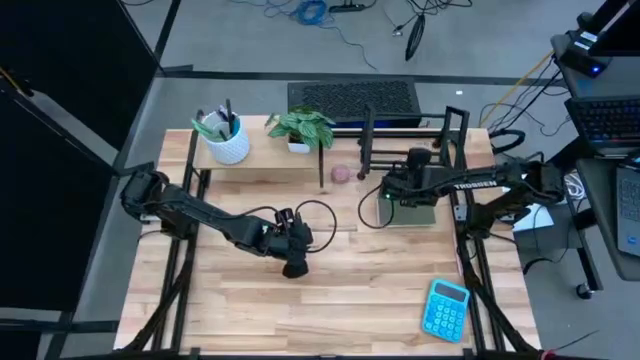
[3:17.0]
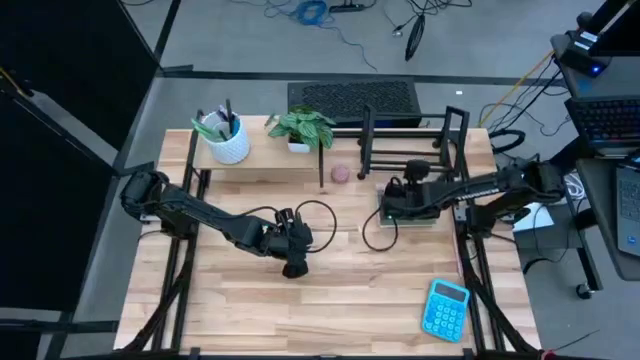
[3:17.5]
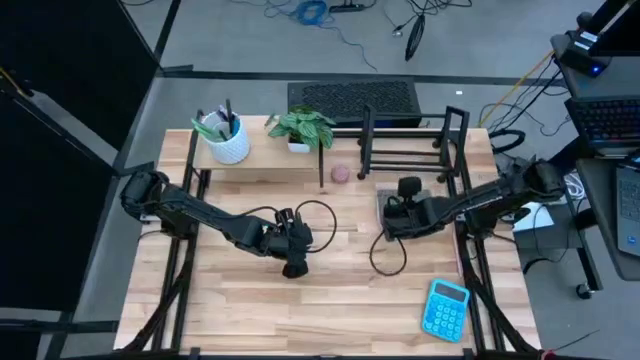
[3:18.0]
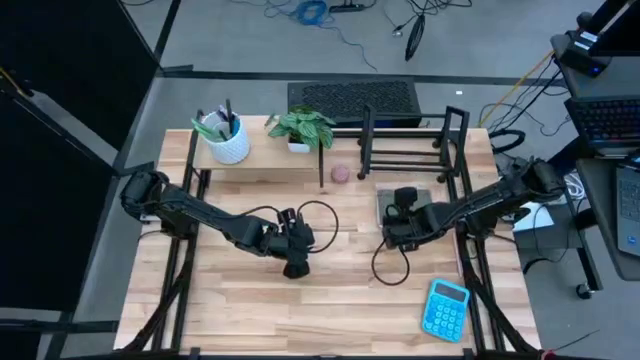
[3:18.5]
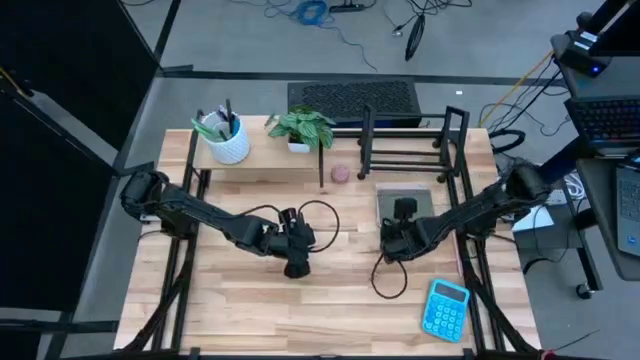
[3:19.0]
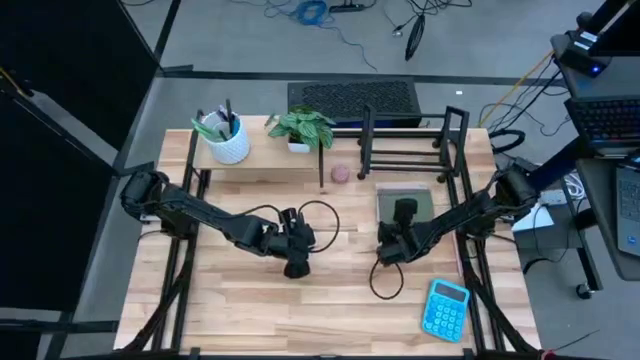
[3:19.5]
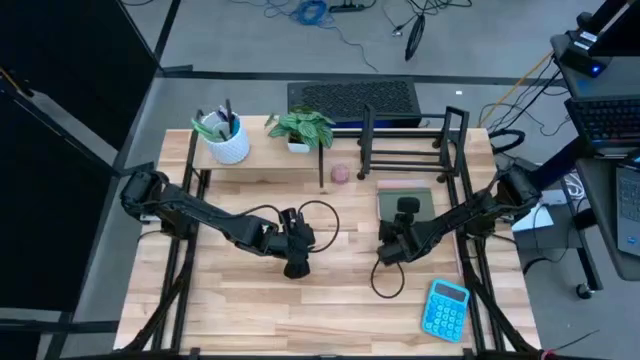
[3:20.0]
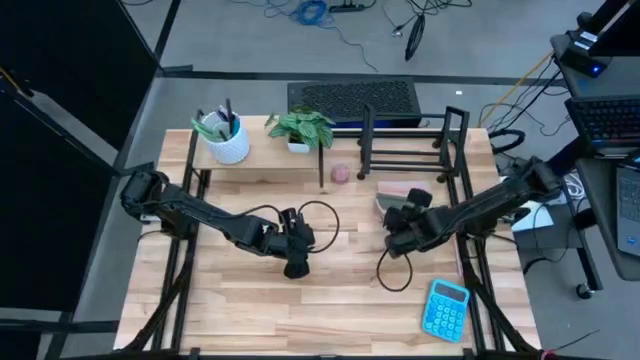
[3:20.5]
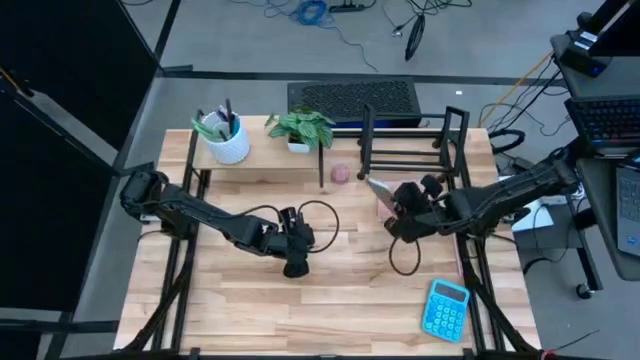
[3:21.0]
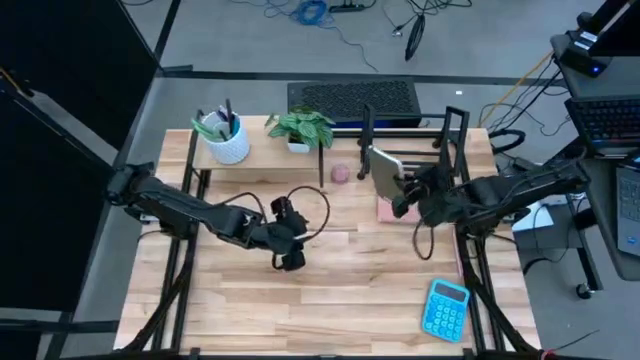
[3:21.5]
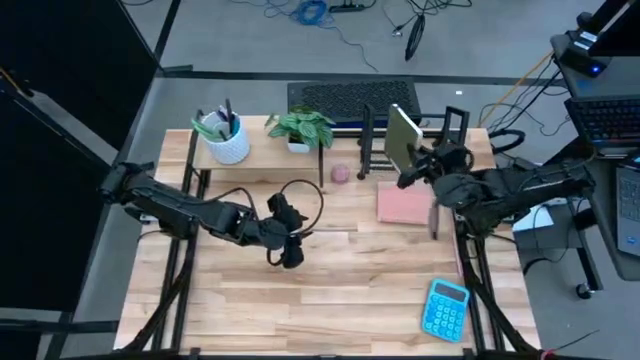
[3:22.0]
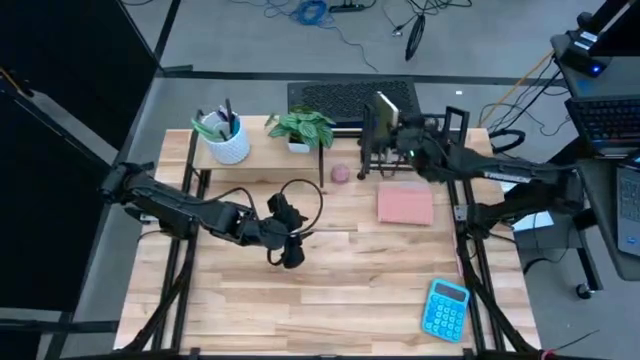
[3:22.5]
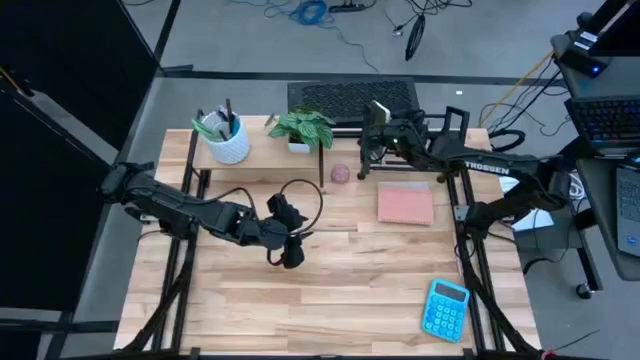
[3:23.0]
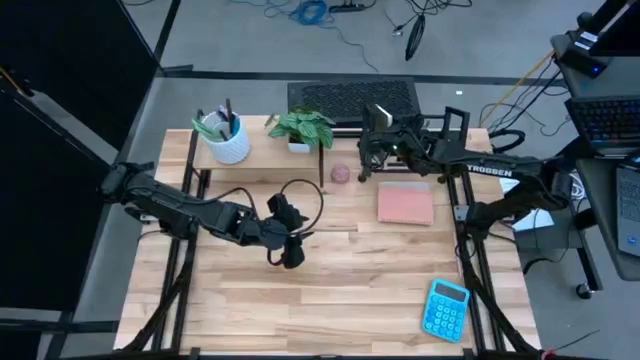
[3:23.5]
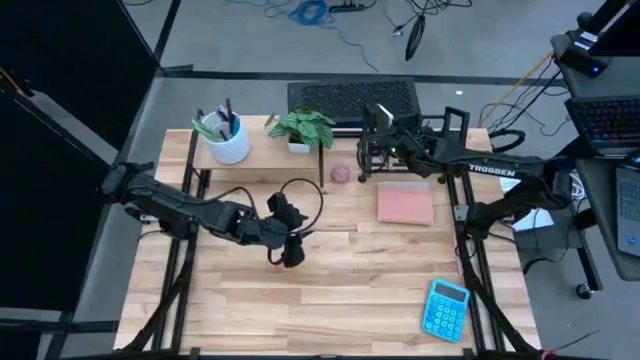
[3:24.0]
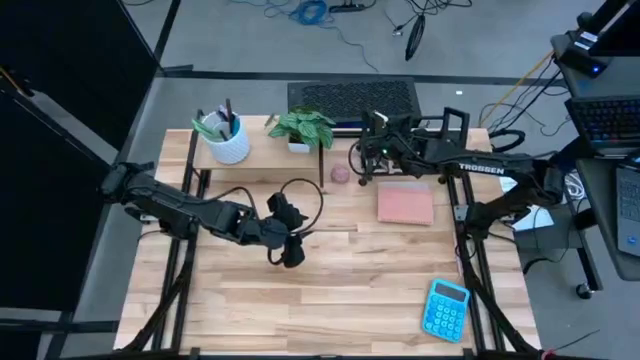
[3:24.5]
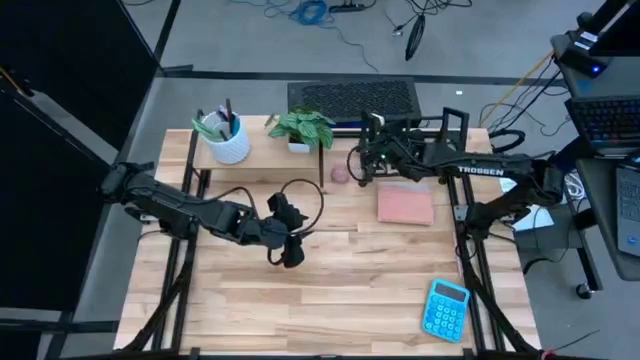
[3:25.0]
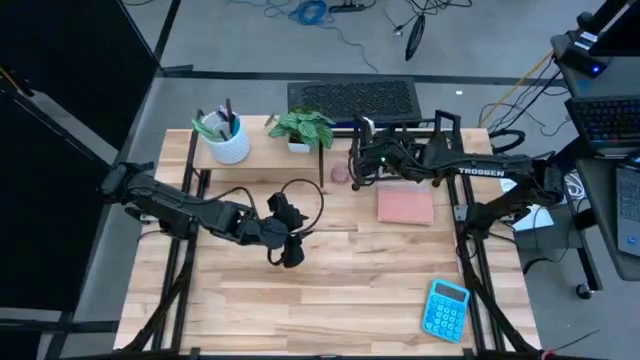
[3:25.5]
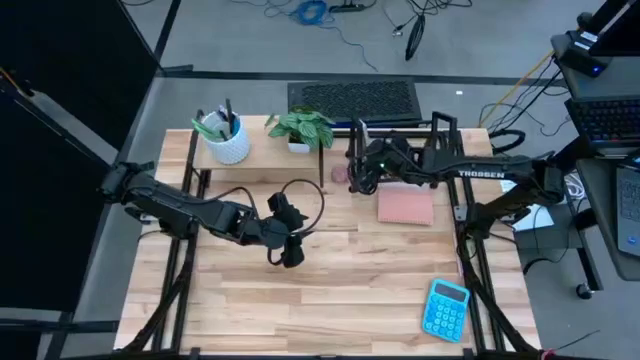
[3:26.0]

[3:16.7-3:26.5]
Task: Stock shelves
Put the green notebook on the black bookshelf

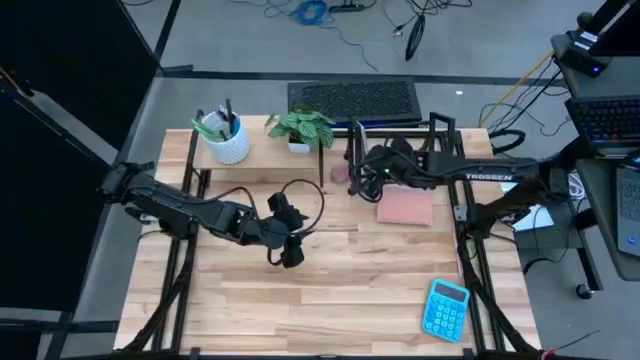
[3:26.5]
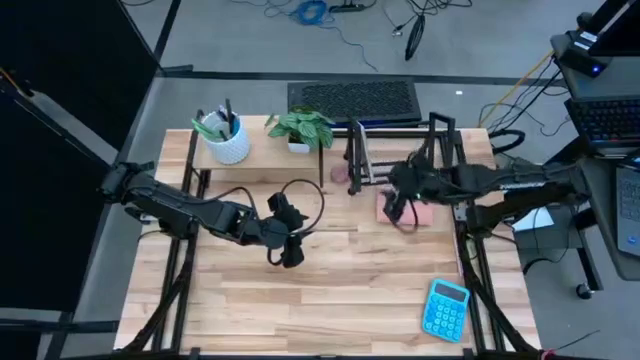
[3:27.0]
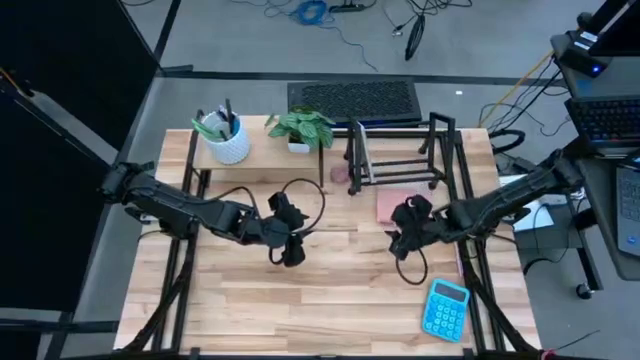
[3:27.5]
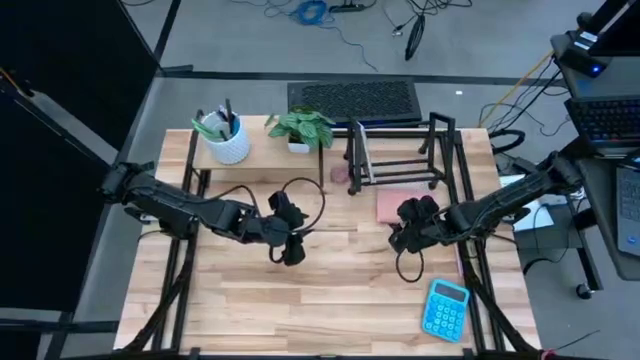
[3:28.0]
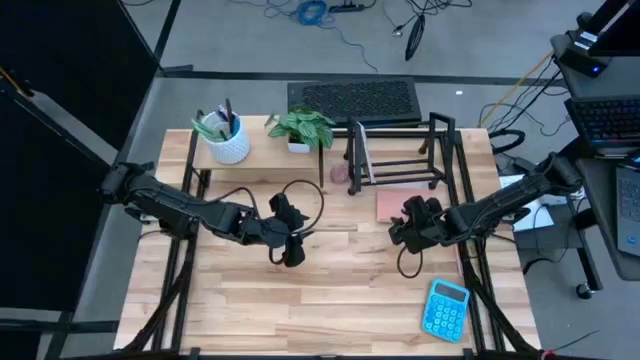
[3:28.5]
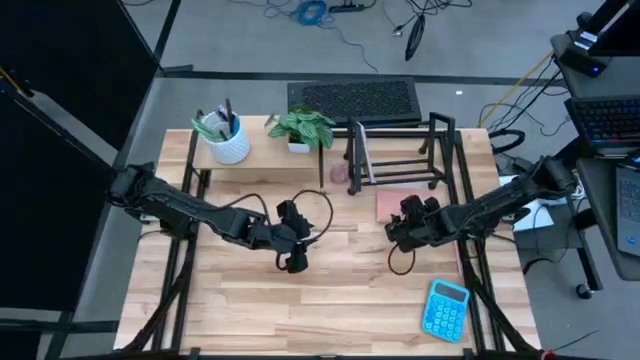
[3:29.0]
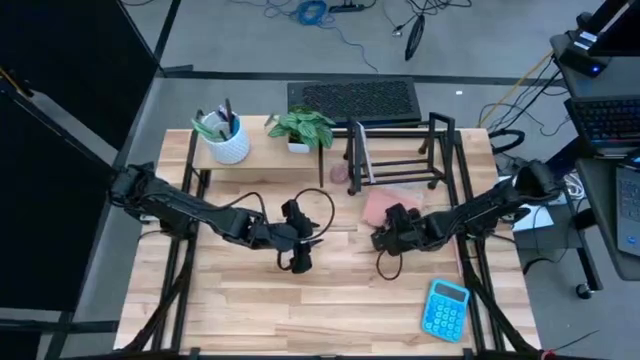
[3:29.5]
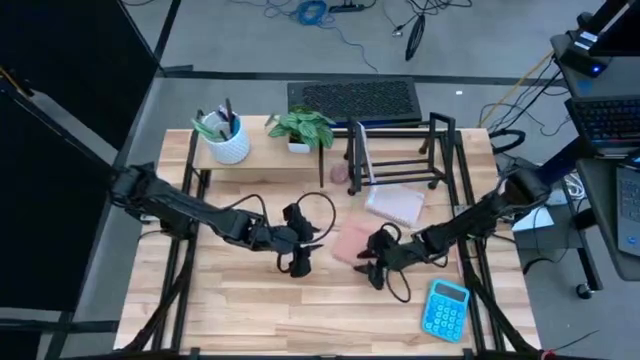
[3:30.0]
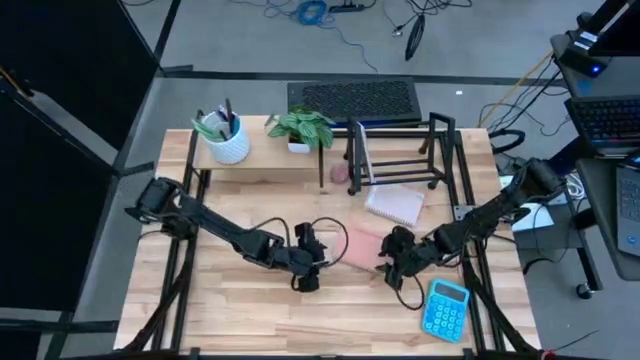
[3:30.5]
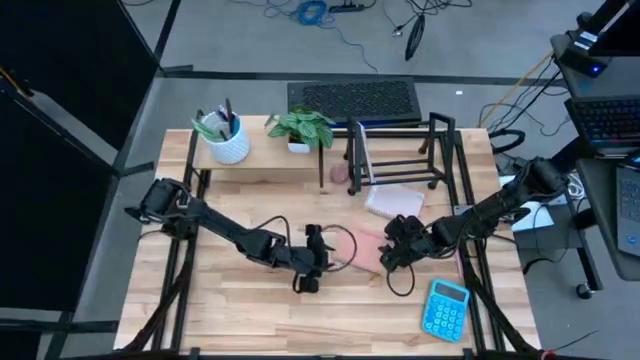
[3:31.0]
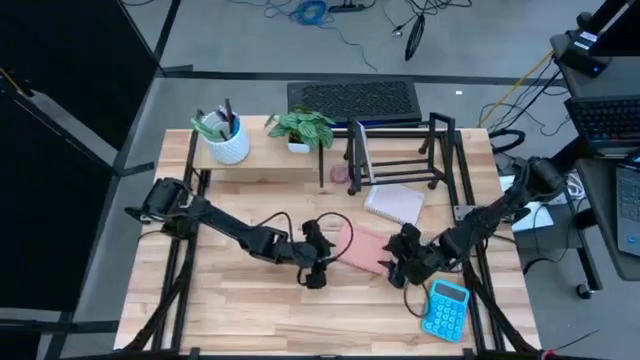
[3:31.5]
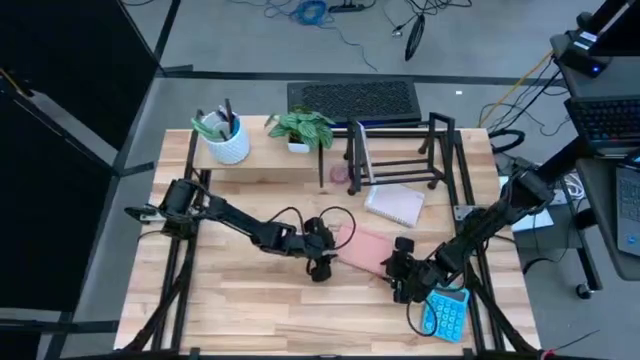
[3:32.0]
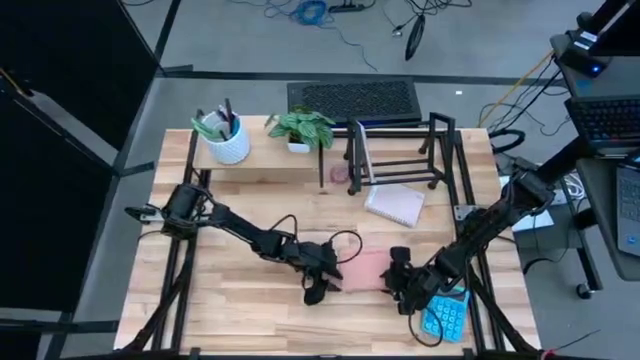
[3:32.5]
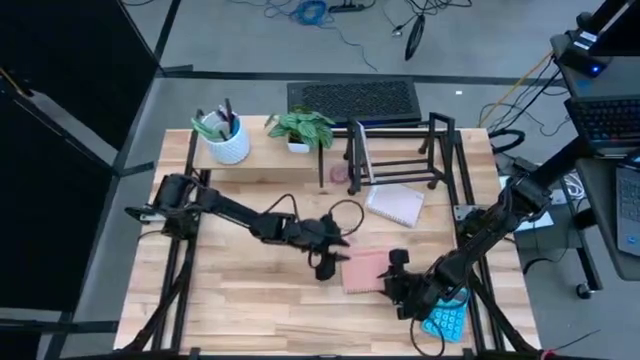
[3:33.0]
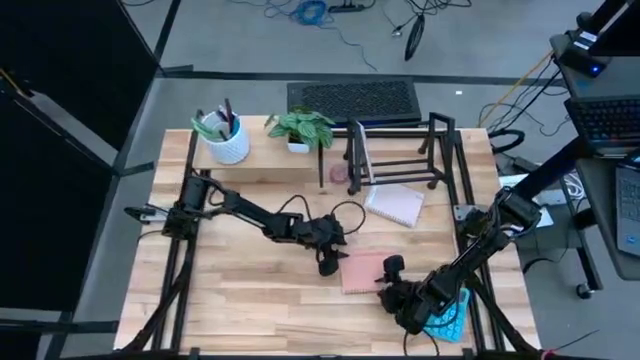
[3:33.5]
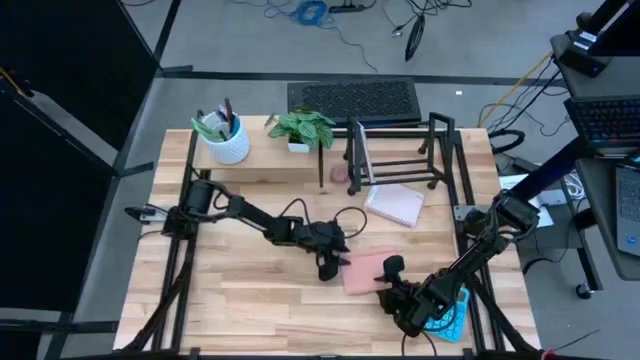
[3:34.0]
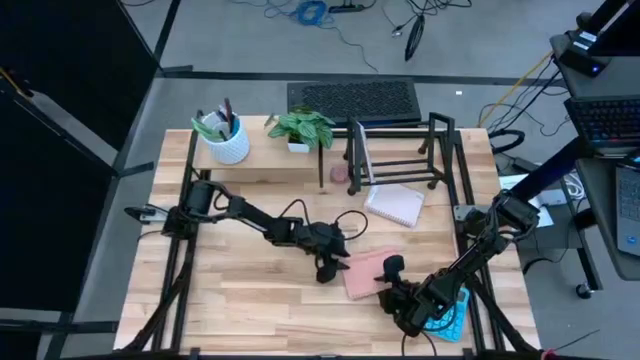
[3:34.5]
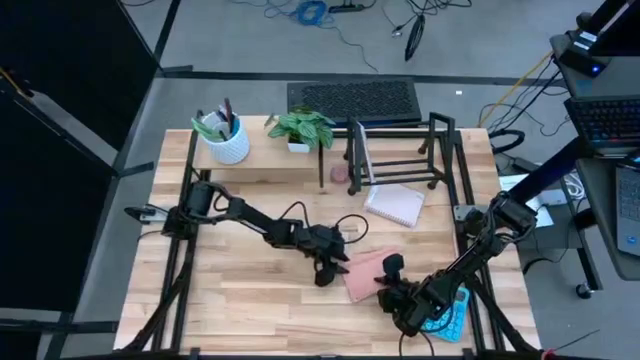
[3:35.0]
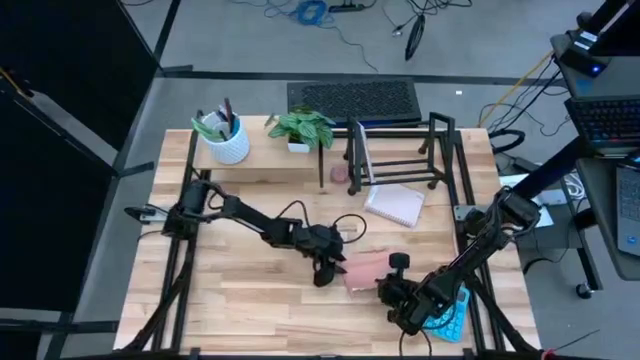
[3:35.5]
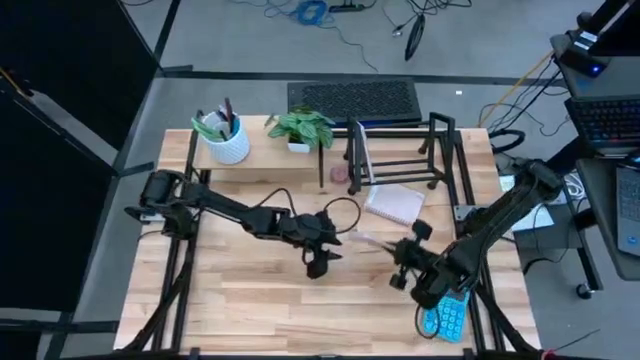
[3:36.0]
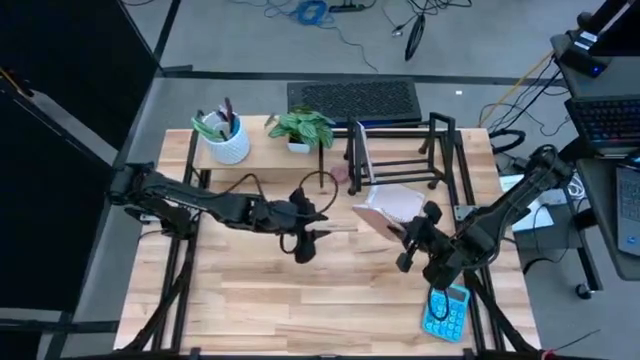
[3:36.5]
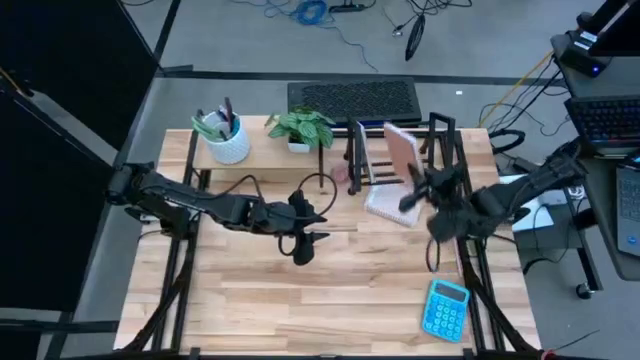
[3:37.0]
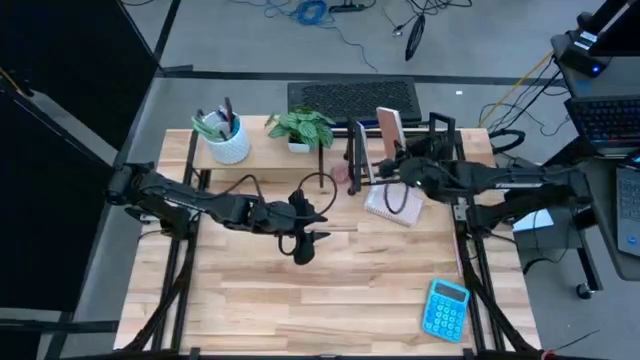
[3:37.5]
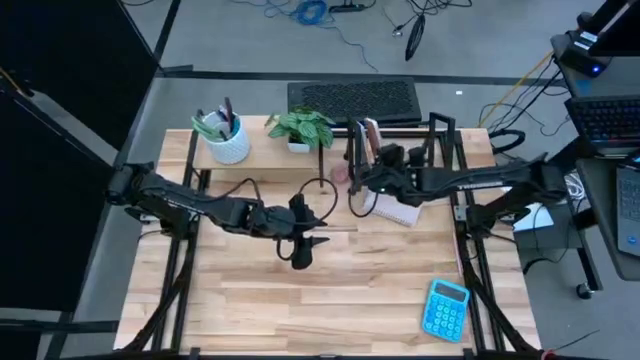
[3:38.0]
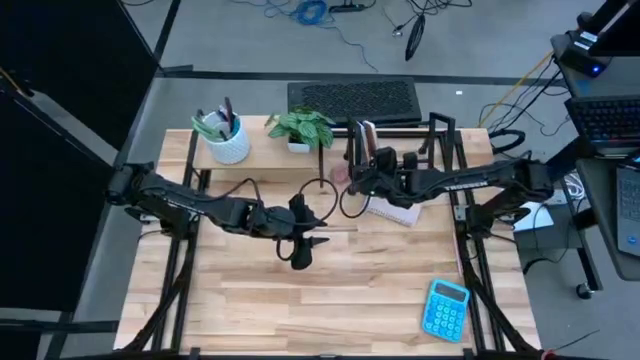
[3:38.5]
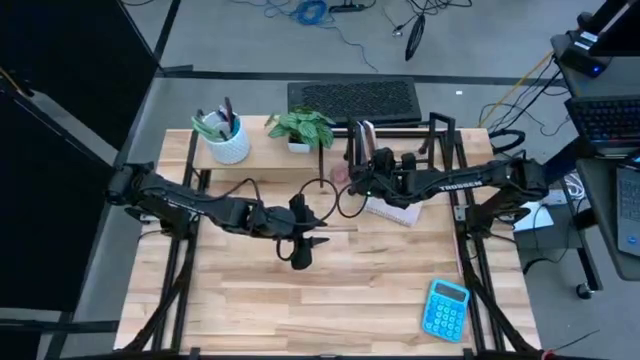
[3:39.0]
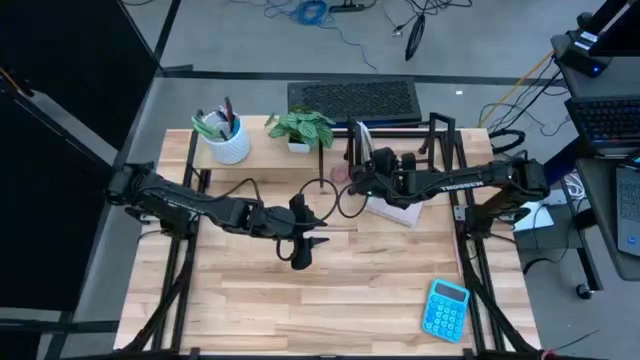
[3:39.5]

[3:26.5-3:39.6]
Put the pink notebook on the black bookshelf
